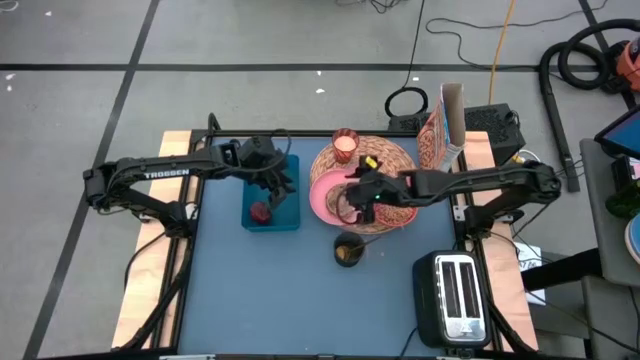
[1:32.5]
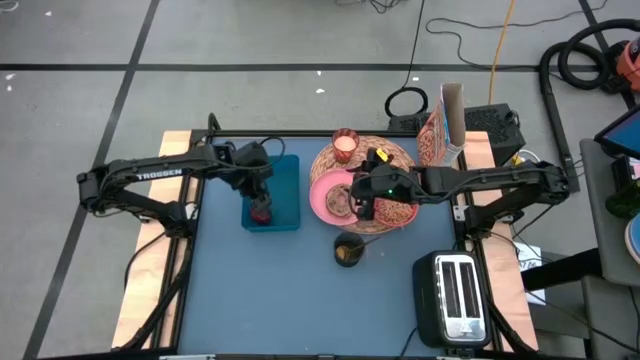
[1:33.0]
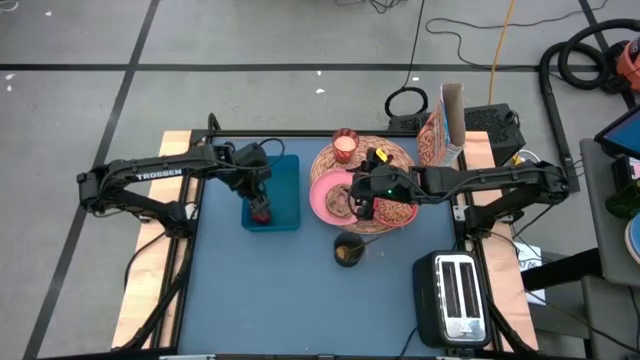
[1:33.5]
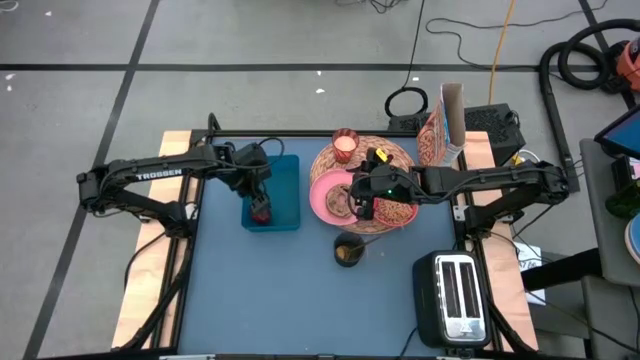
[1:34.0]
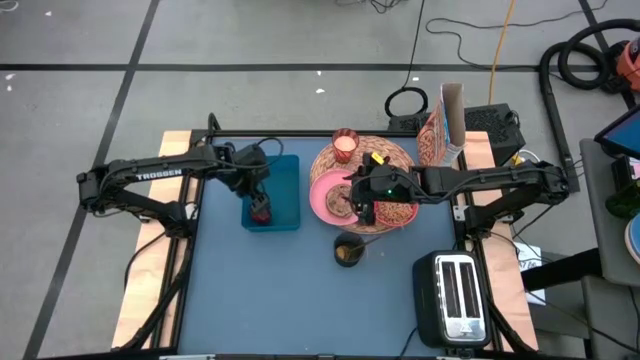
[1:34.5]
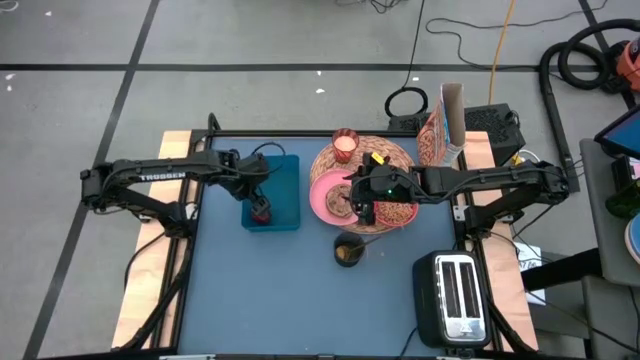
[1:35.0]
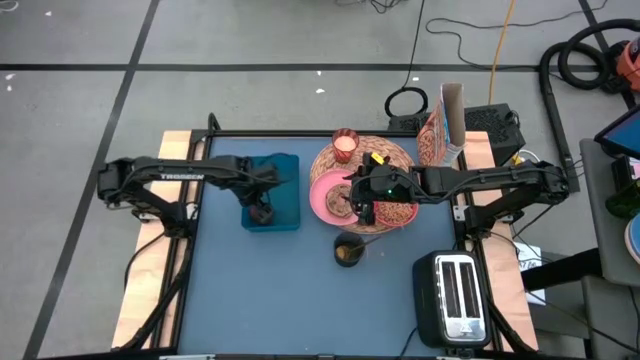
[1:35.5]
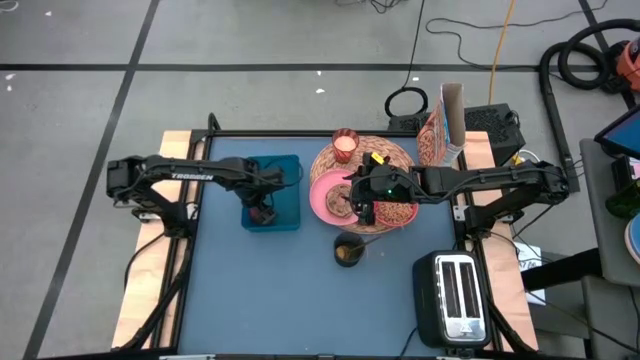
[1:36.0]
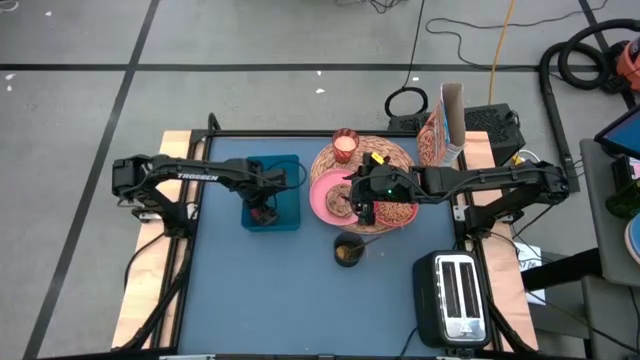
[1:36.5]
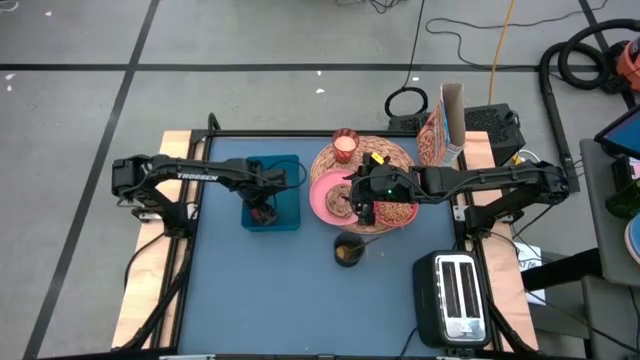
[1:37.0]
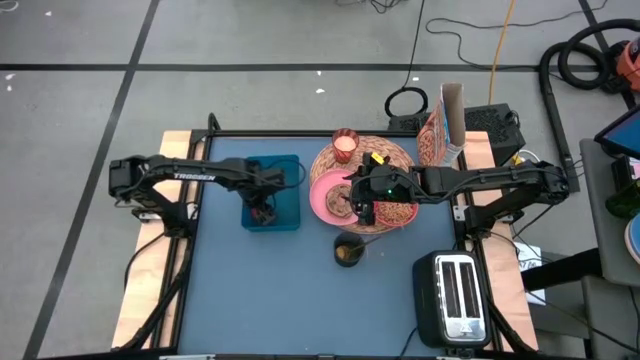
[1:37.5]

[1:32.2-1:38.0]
Task: Arrange a breakfast setting
Put the apple to the middle of the brown placemat

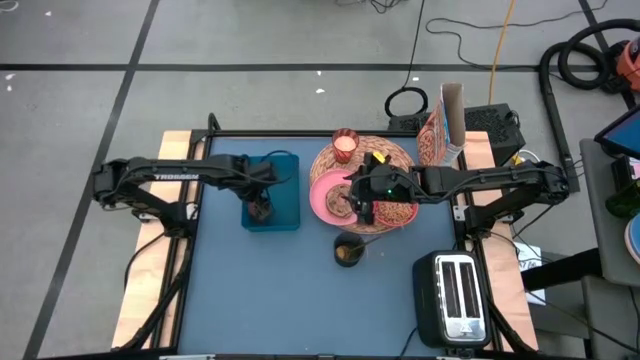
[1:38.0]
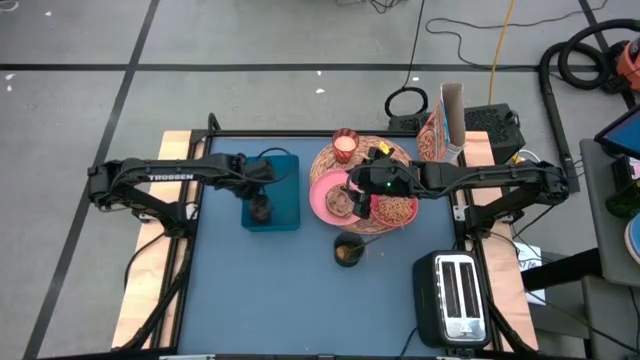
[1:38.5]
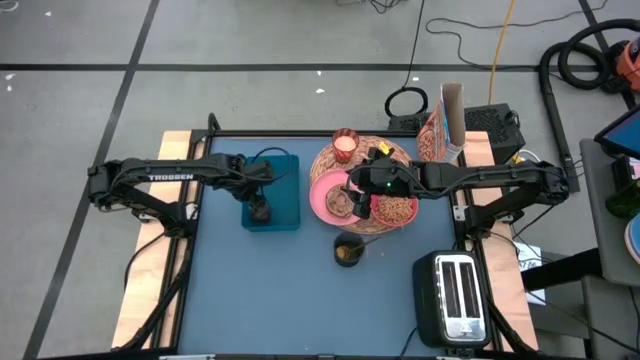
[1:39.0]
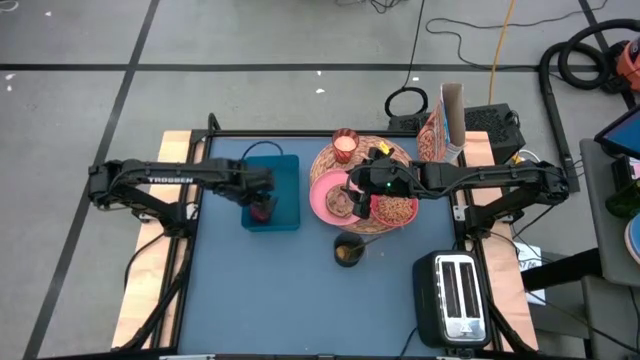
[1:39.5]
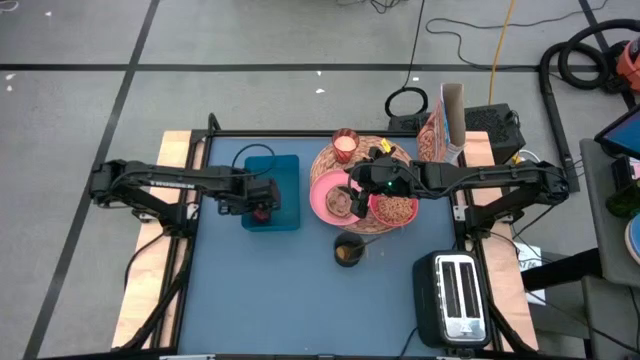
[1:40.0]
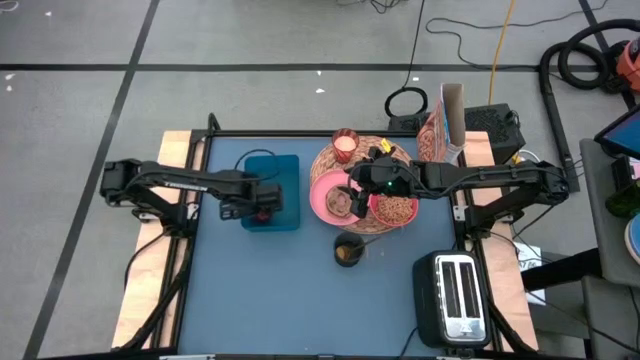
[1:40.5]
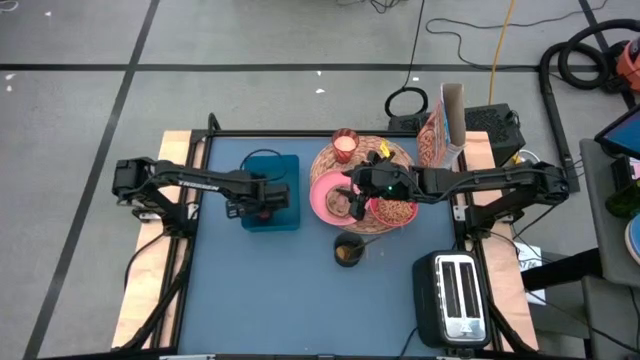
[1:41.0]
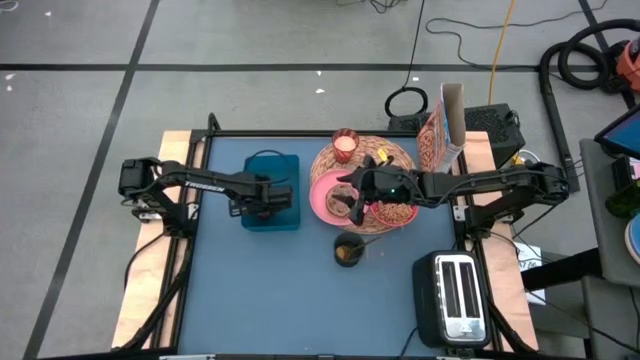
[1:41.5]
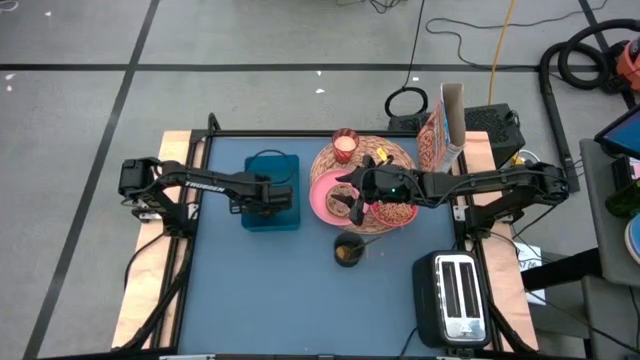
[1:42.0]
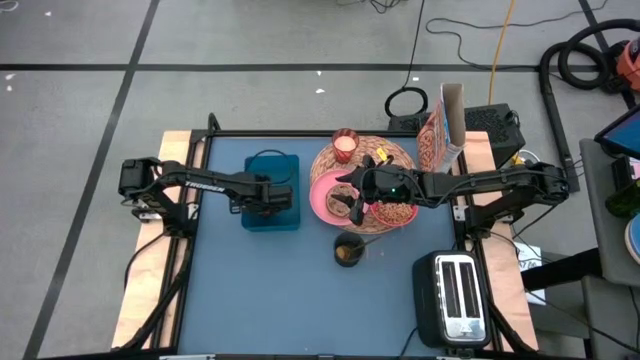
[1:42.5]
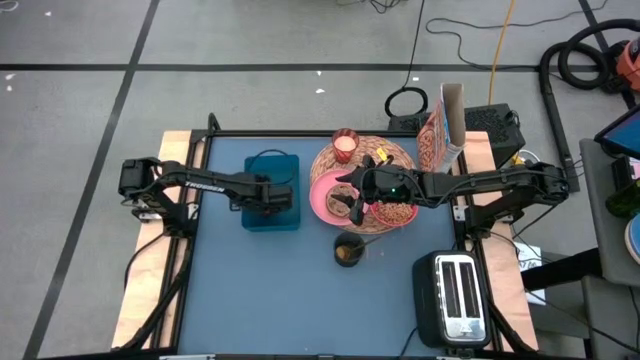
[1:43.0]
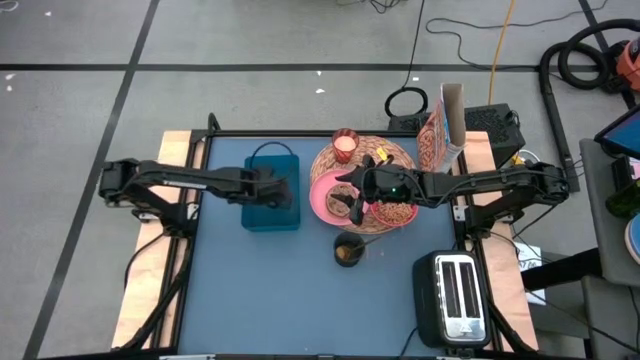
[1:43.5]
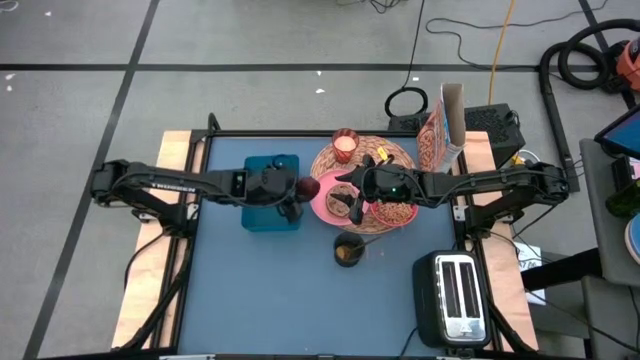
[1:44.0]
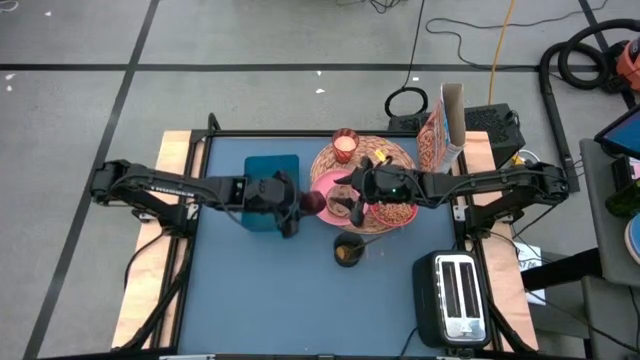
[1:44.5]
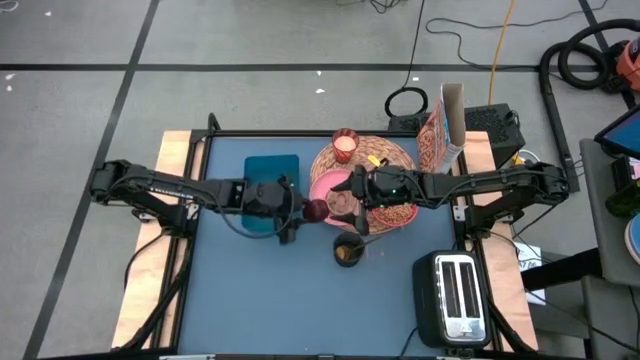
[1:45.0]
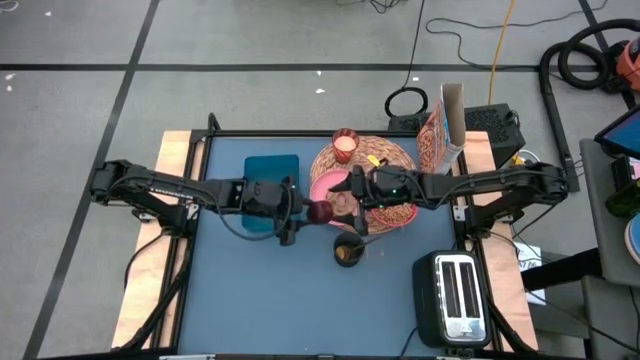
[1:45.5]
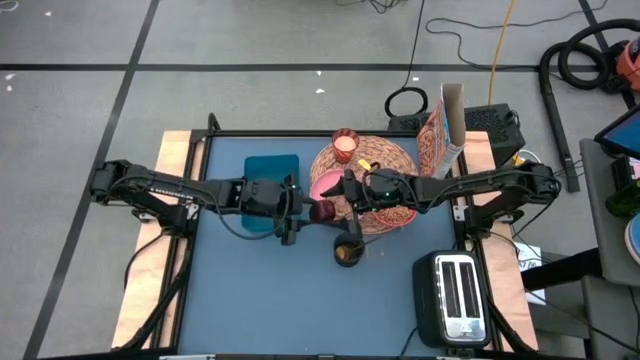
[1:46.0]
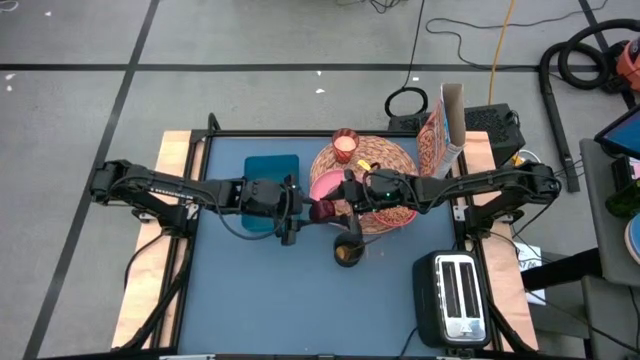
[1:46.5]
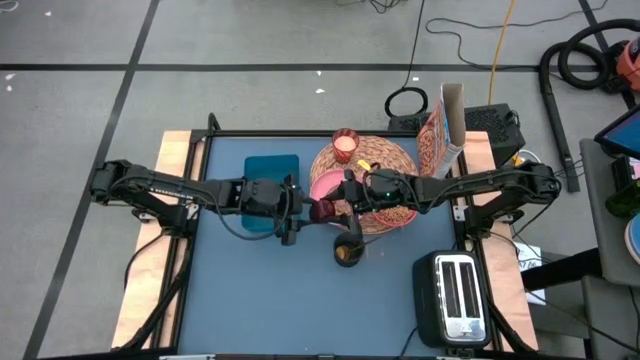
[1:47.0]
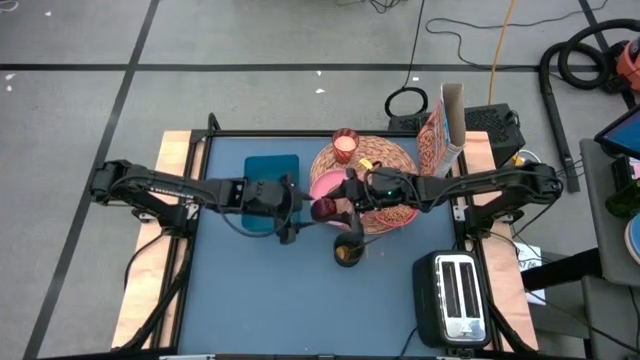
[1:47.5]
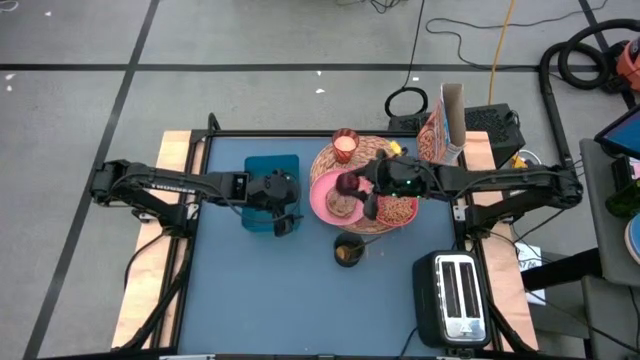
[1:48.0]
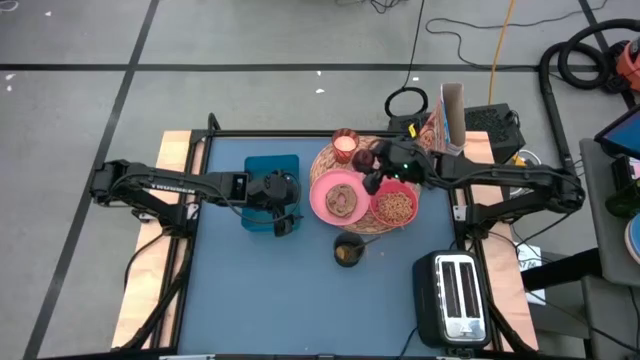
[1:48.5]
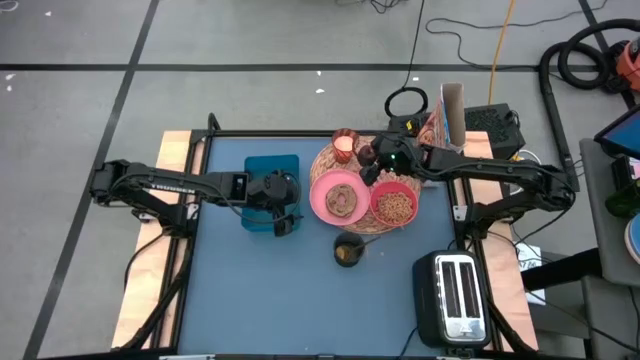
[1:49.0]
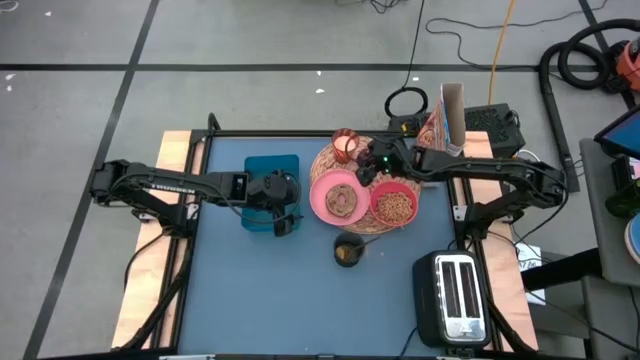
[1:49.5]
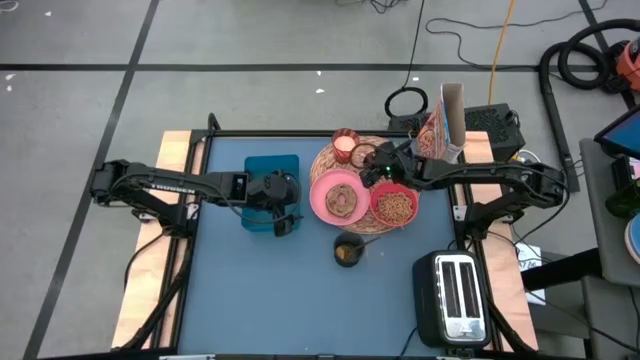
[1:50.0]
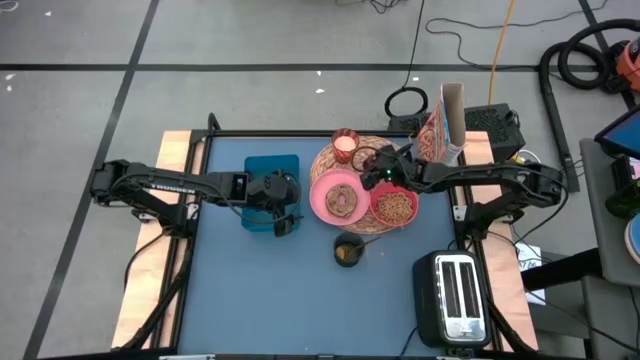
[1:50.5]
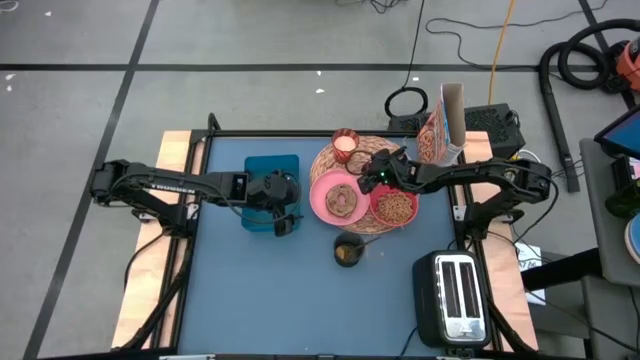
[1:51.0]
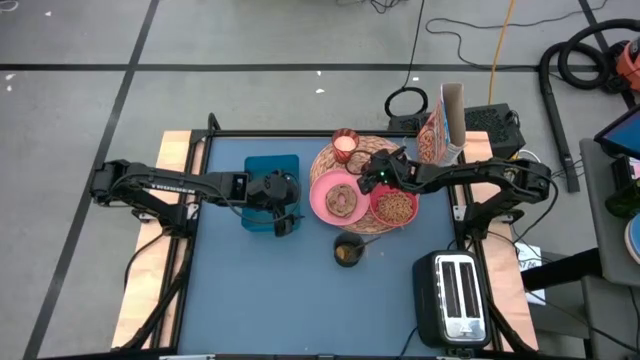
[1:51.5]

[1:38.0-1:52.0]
Put the apple to the middle of the brown placemat

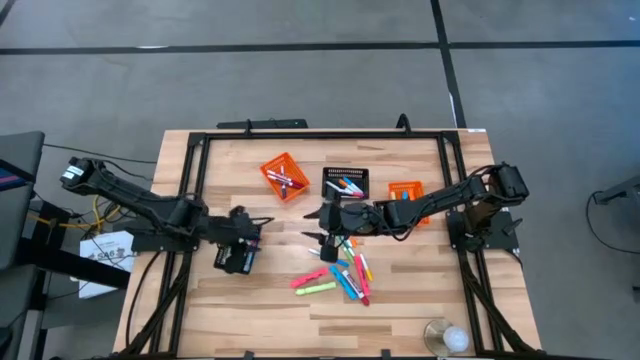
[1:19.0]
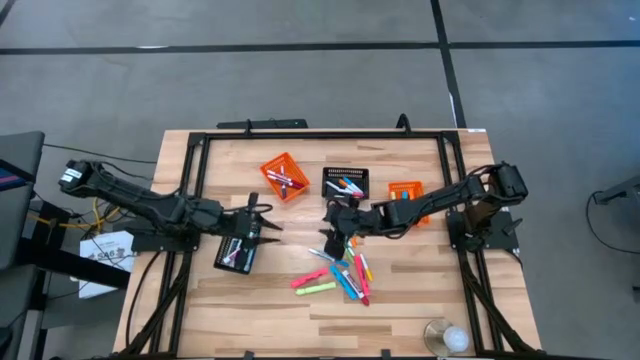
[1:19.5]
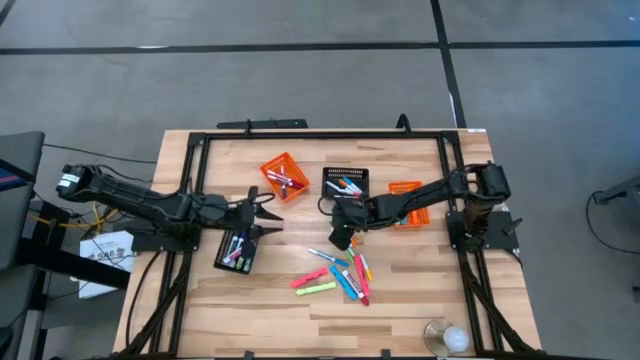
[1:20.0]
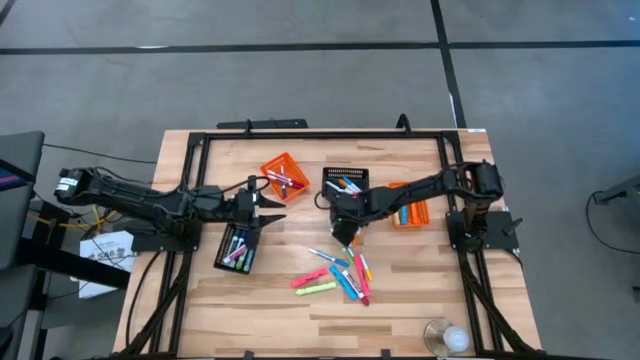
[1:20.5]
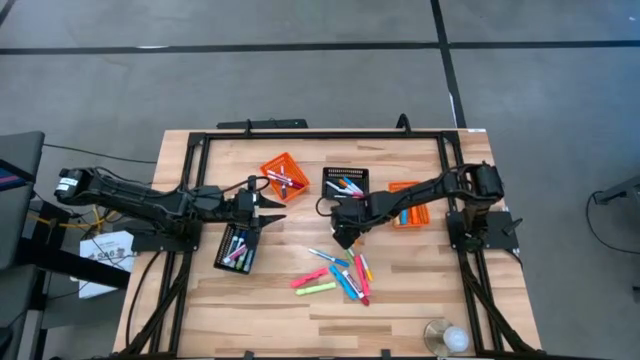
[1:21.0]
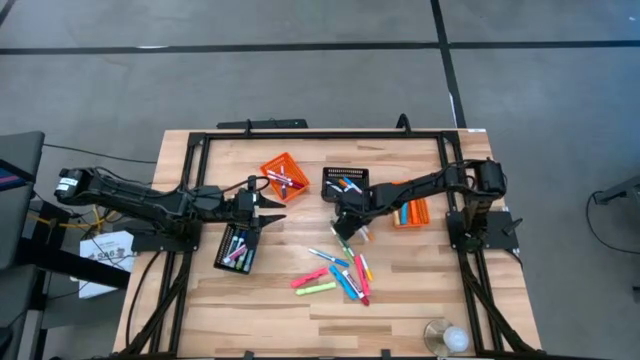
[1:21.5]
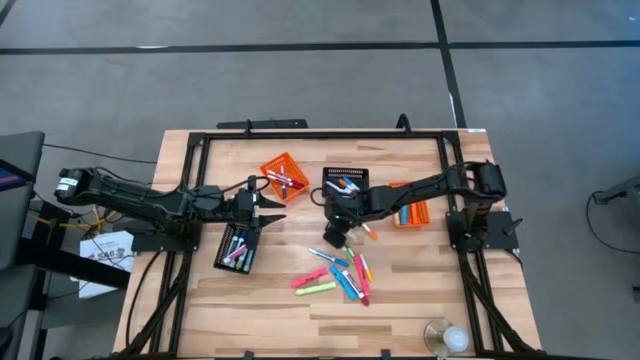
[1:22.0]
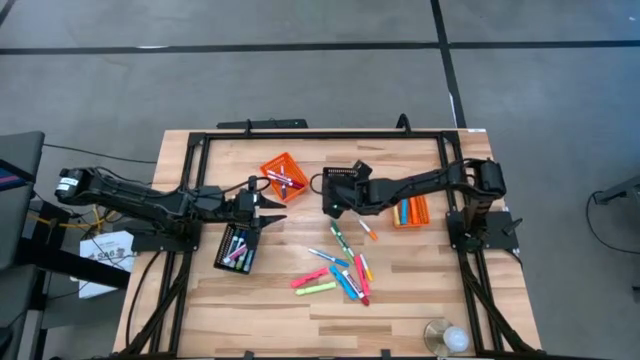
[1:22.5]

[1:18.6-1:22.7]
Task: Pick & Place Markers
Put the pink highlighter into the right black bin
